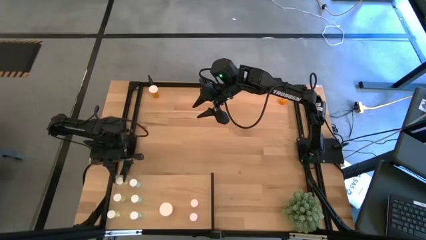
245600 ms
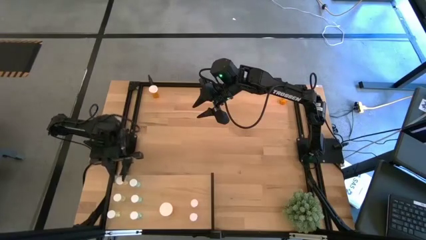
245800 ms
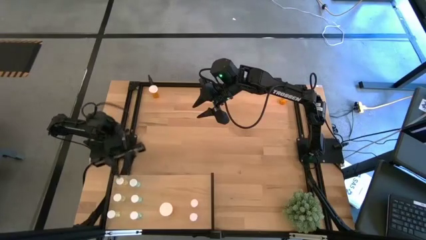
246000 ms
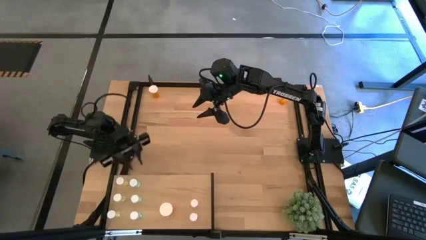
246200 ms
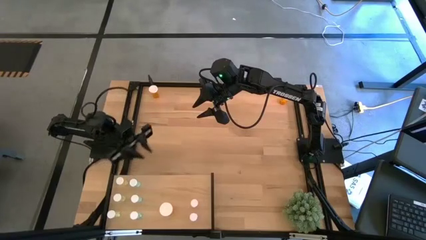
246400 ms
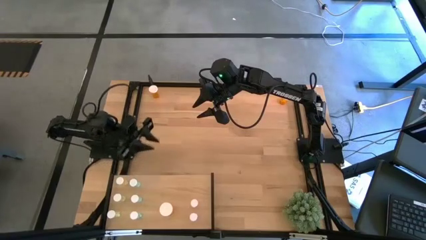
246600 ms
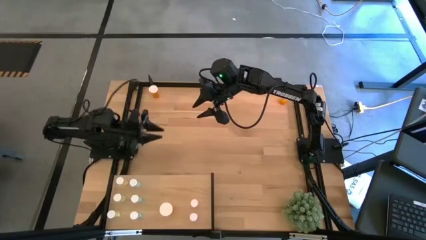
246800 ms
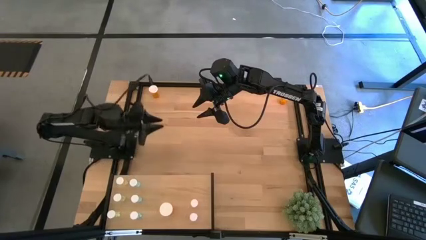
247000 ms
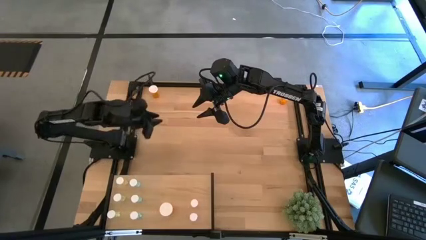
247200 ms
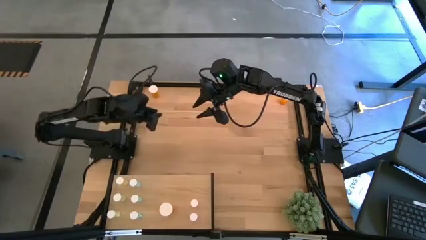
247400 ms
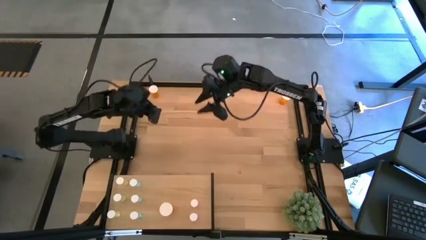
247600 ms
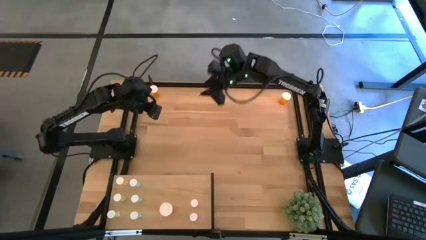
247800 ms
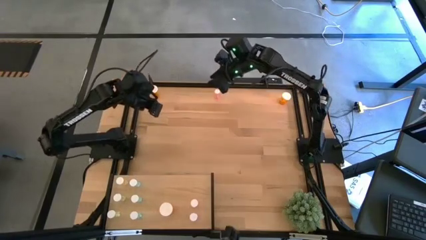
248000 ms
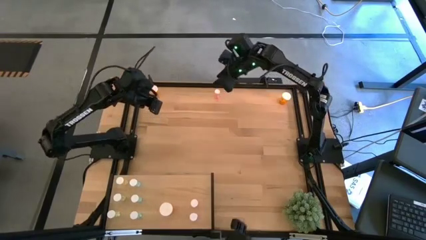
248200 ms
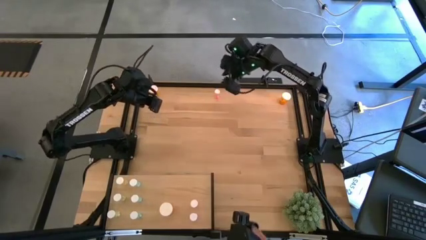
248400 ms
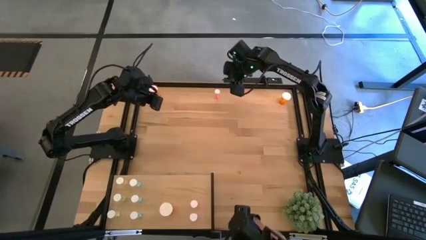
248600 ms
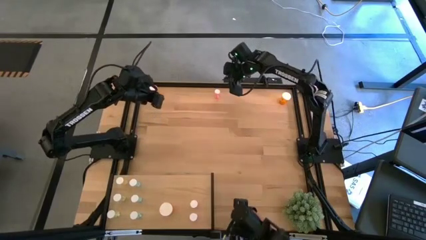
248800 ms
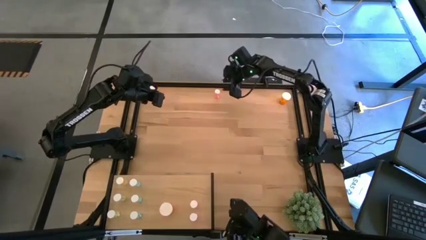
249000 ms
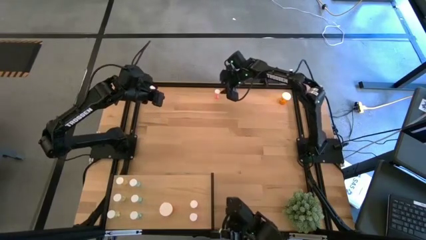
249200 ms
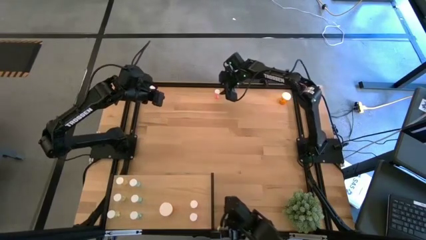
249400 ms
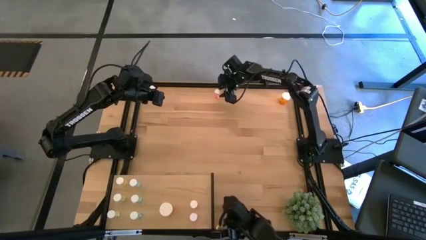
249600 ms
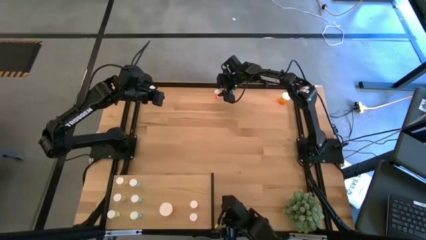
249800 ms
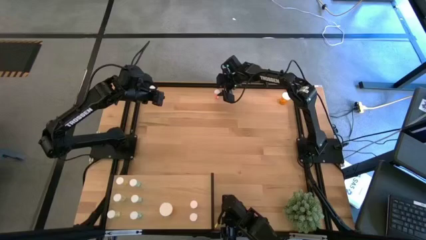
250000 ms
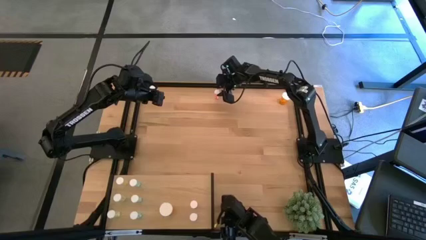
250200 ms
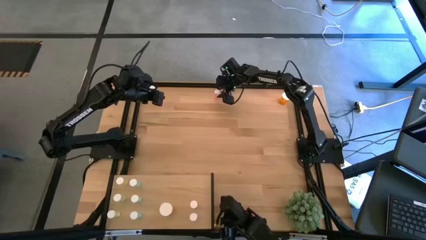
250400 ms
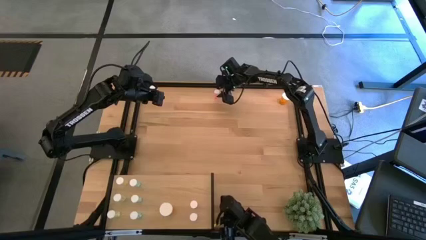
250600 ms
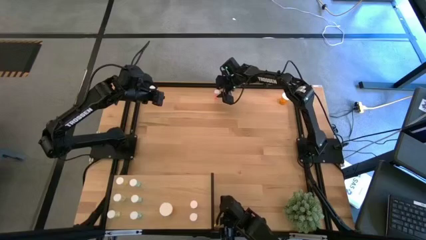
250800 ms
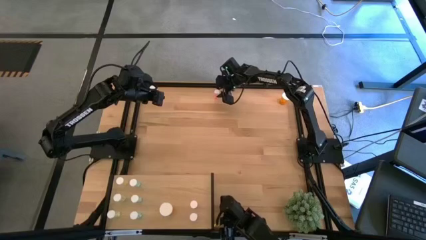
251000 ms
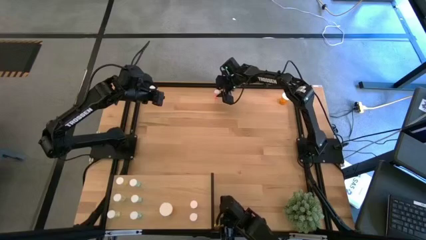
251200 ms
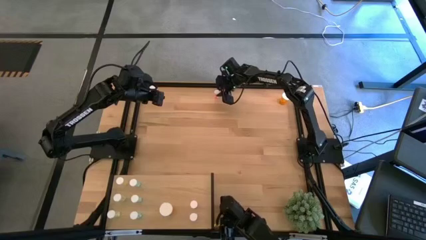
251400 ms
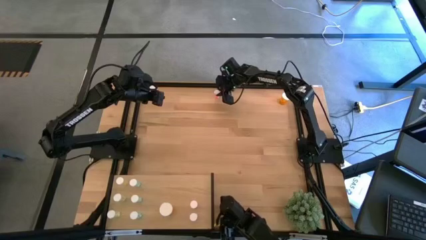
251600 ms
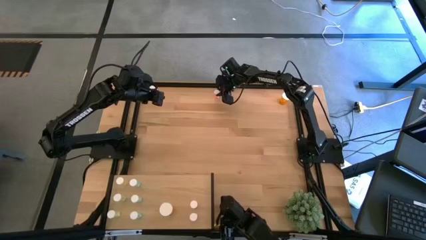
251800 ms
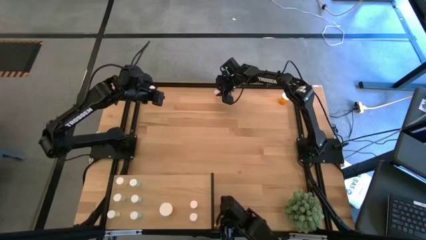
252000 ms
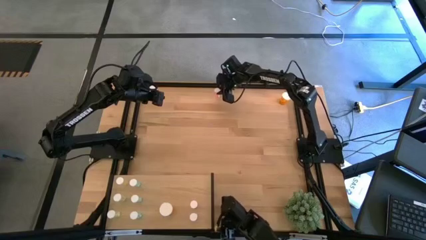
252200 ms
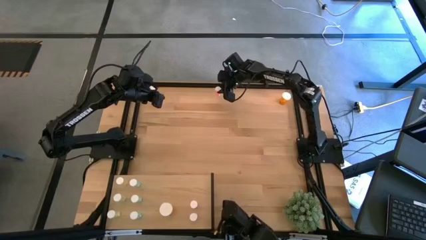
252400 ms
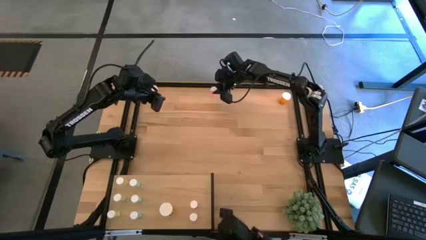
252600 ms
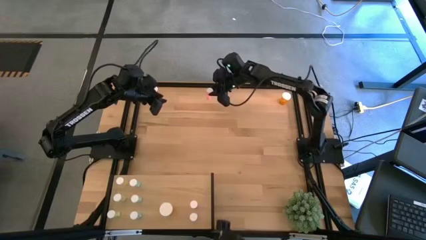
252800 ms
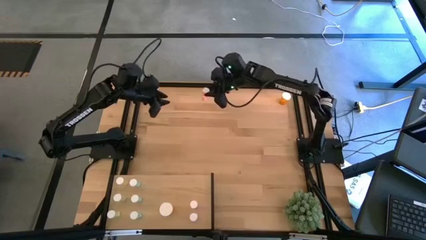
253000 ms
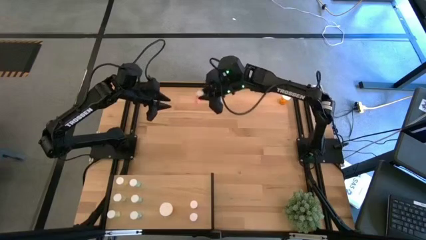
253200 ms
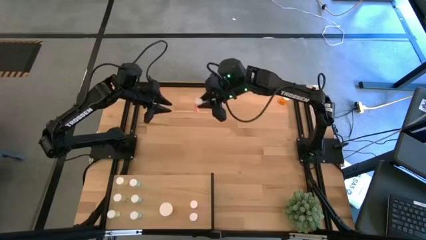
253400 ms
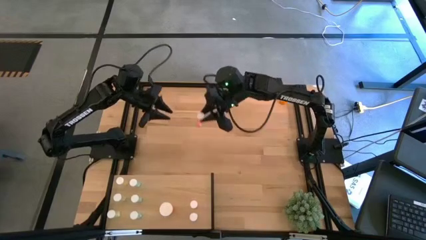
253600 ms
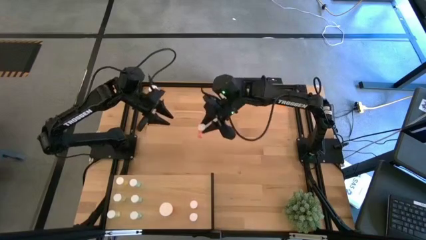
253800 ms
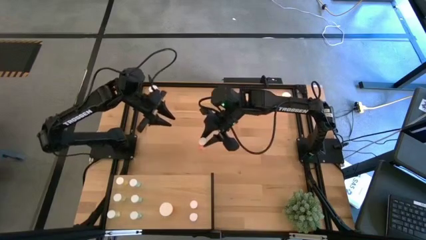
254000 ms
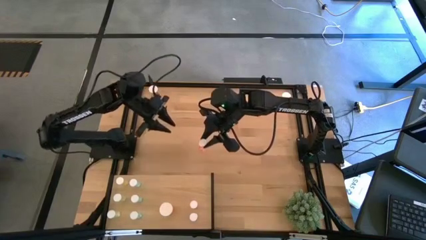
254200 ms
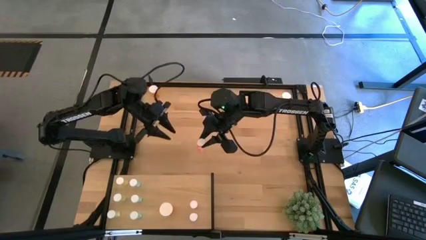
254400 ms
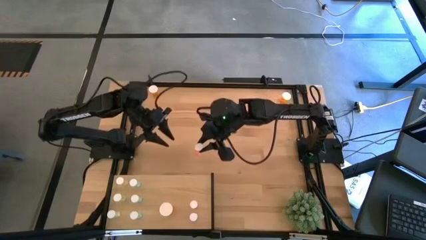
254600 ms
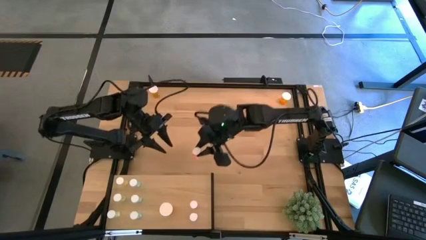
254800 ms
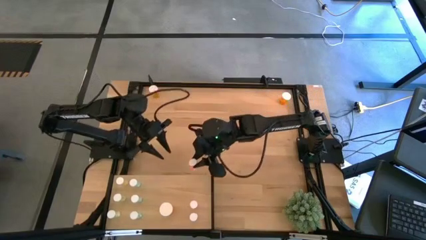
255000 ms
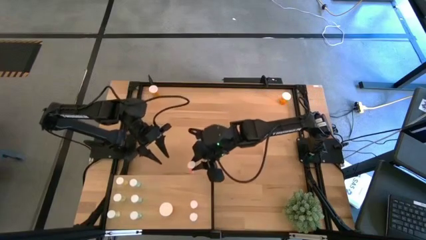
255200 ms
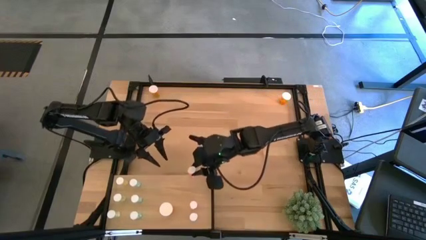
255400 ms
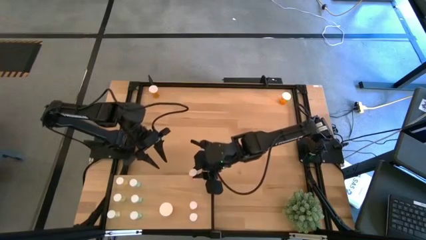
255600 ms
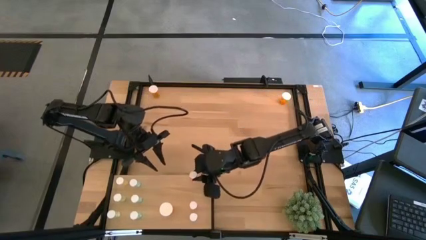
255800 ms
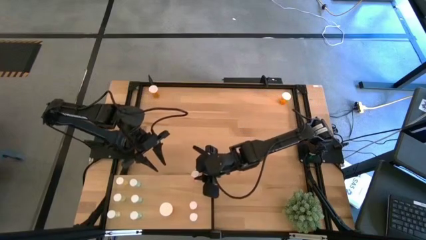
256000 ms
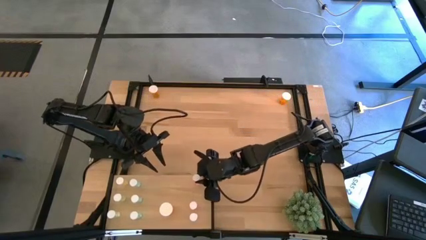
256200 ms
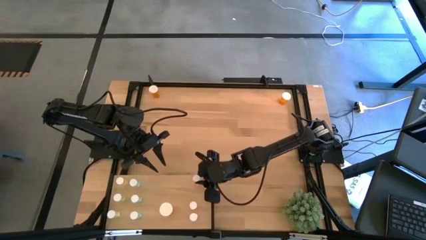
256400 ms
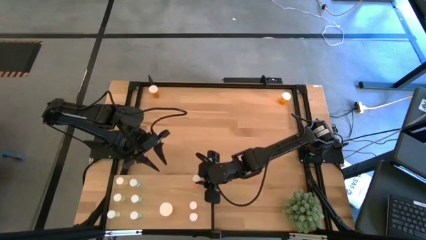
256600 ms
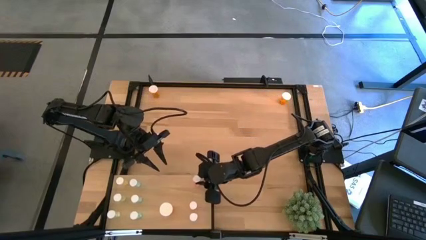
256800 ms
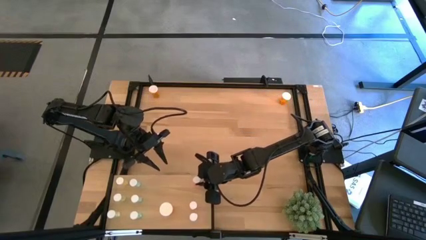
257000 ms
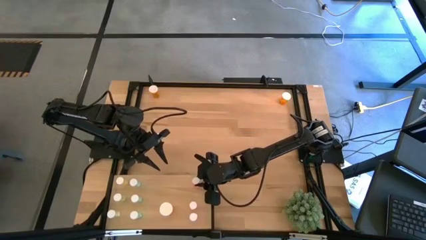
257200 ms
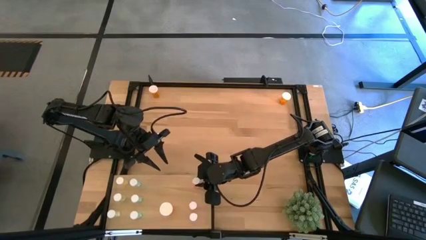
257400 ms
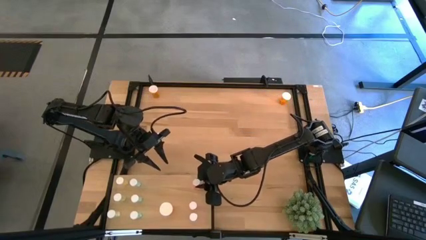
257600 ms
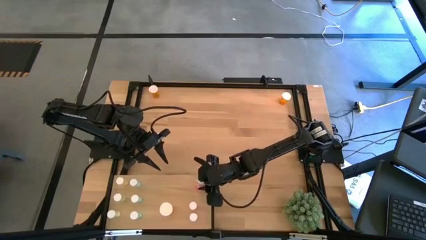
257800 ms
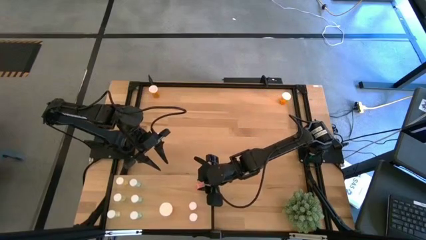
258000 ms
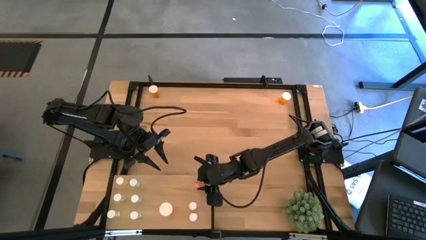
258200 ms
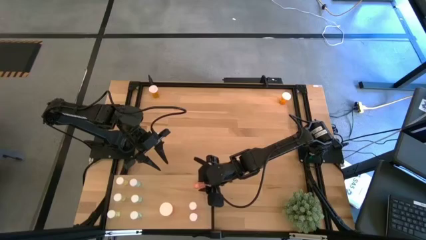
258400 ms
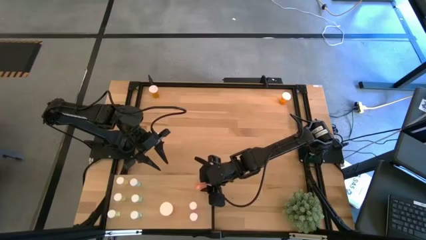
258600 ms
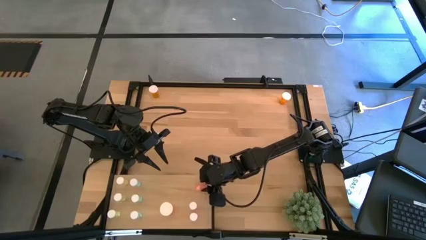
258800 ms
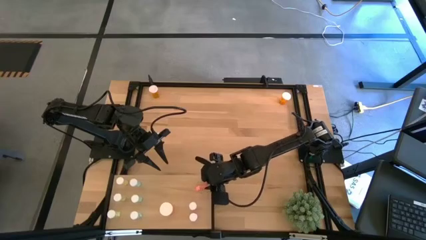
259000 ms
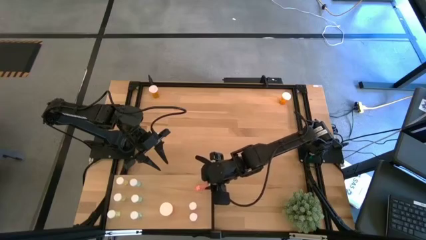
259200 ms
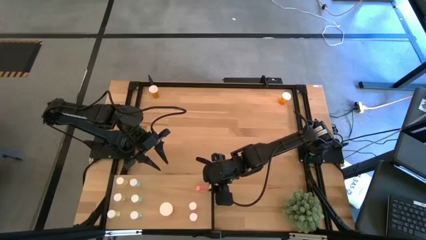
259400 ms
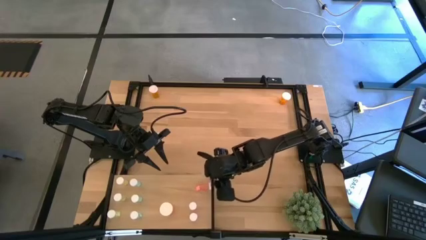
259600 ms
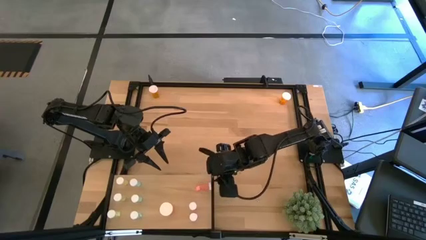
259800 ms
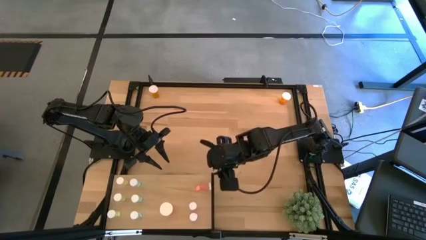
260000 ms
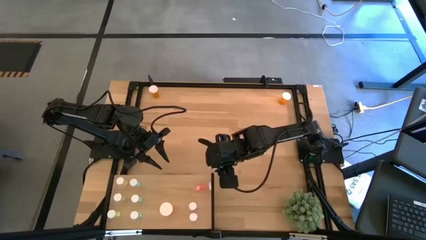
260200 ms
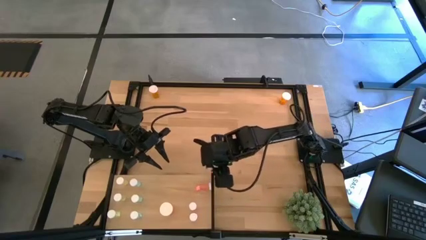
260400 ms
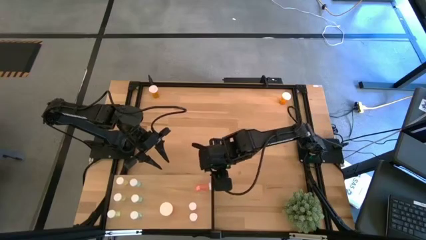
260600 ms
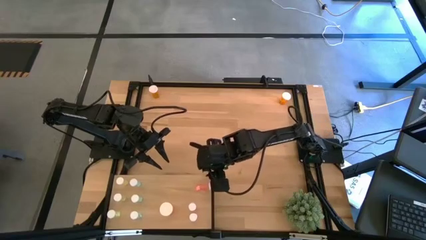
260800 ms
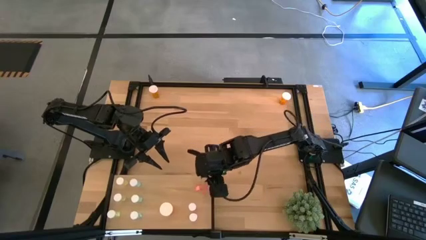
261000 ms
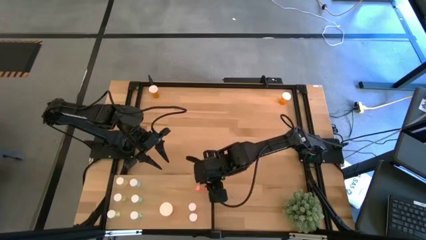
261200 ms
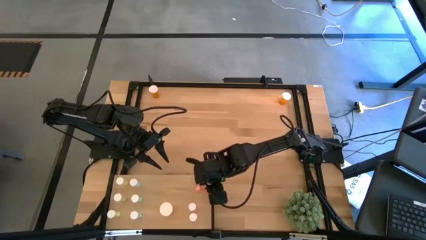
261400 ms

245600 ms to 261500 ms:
Task: Pick and place medicine bottles onto shelf by color
Put the pink pill bottle on the shelf aligned with the other pink pill bottle

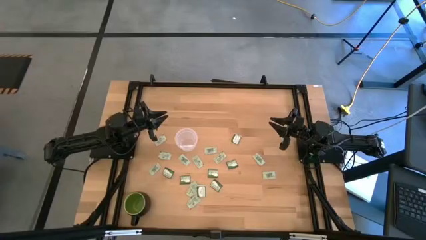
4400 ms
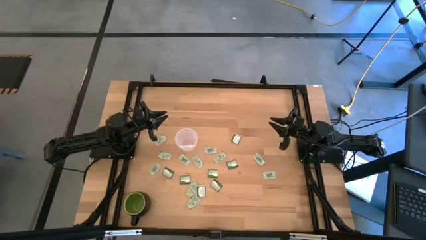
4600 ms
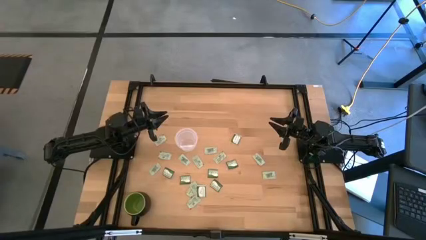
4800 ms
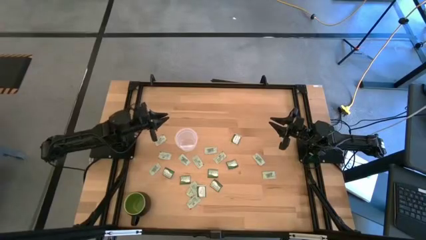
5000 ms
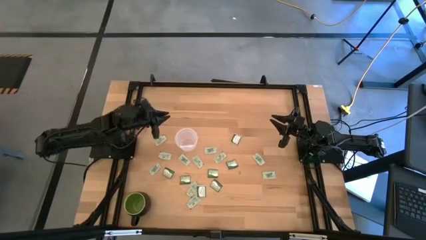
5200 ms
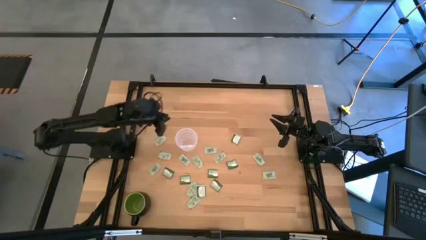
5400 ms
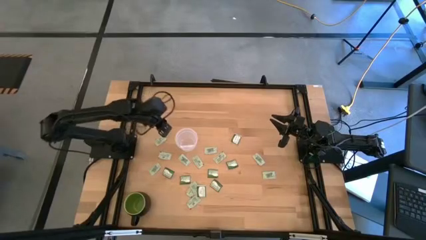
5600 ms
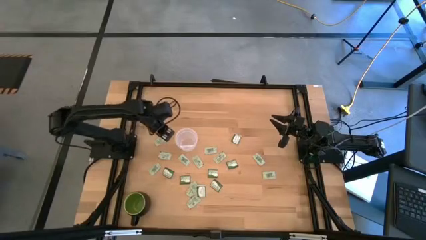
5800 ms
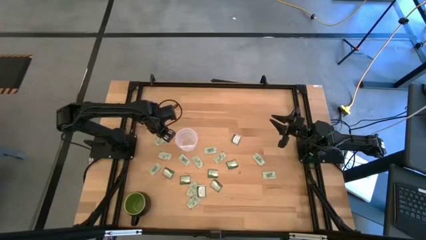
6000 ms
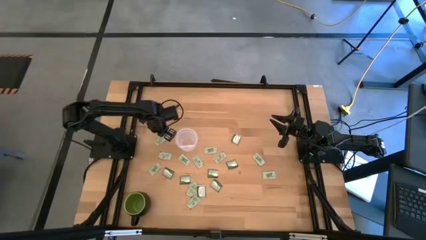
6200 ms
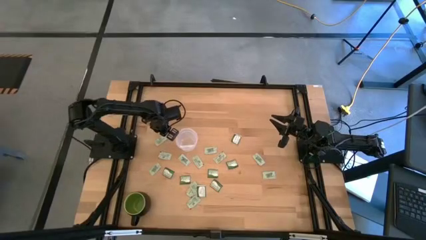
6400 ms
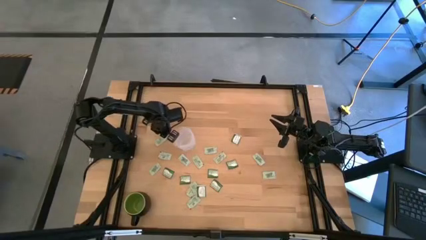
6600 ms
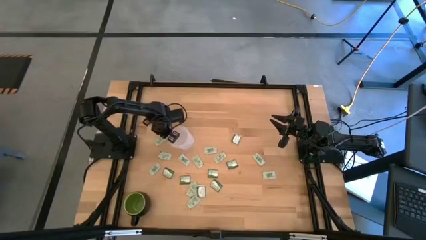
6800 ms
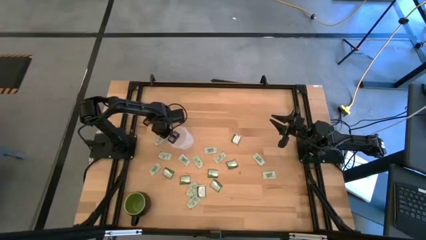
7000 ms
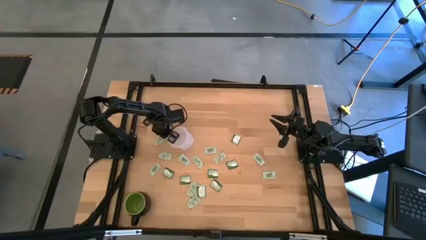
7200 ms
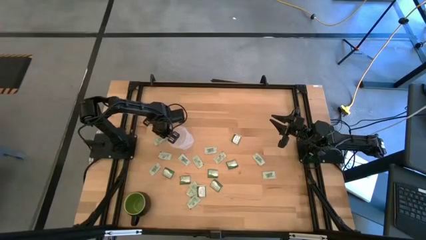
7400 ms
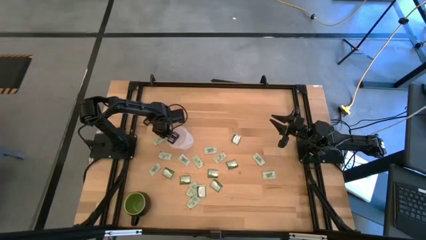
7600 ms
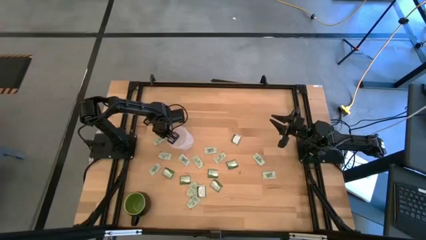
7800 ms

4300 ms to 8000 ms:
Task: Pick and place Stevia / Truvia into bins
Put the light green stevia packet into the transparent container
